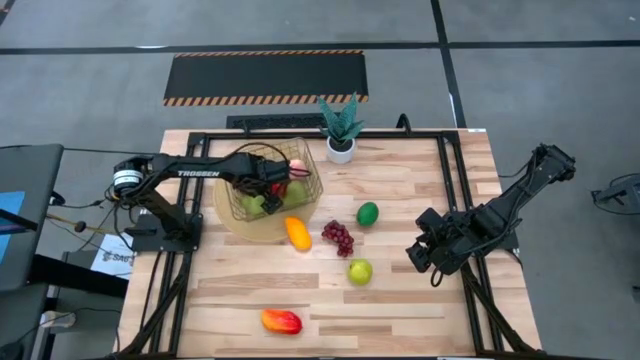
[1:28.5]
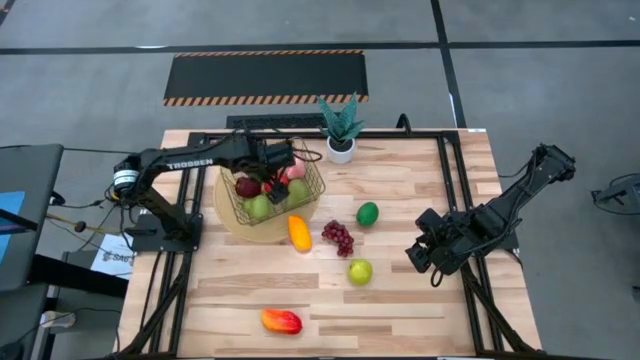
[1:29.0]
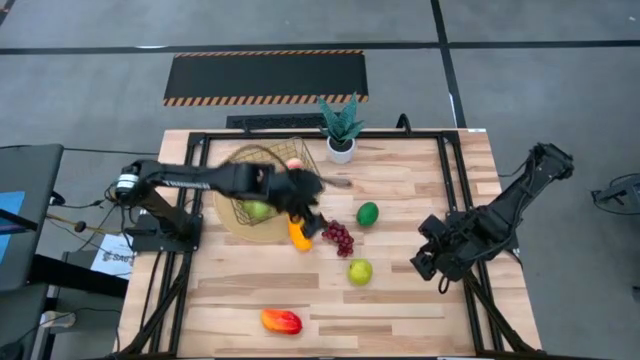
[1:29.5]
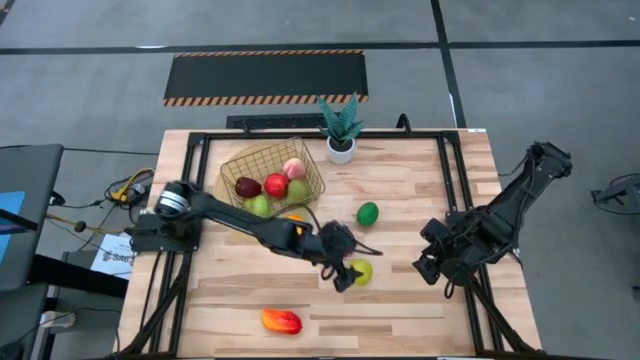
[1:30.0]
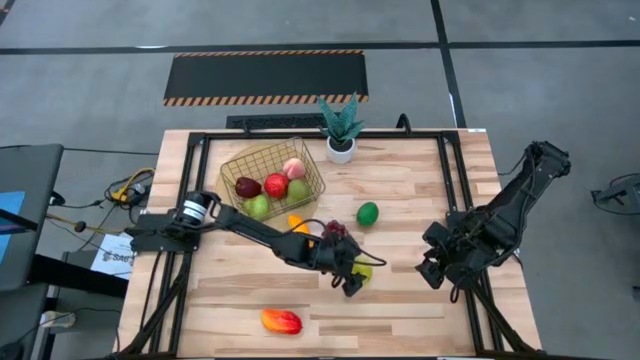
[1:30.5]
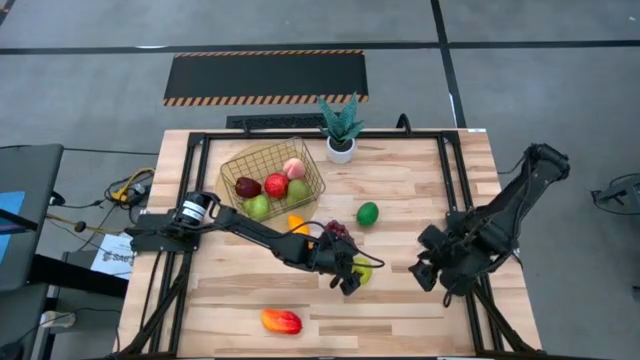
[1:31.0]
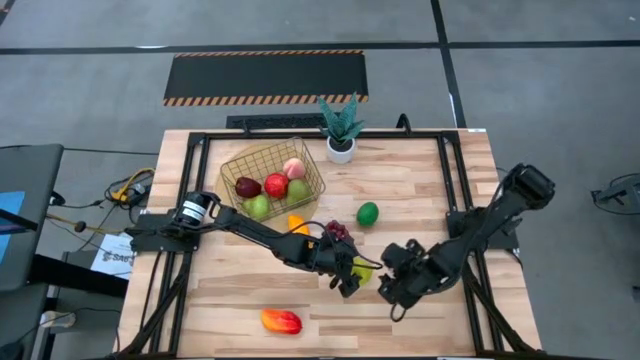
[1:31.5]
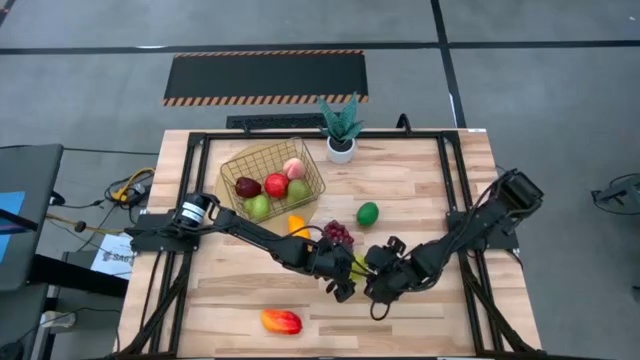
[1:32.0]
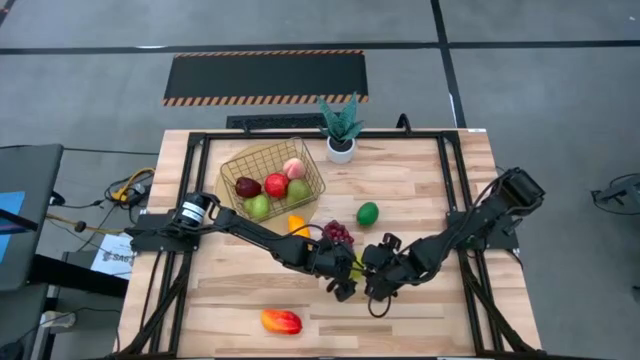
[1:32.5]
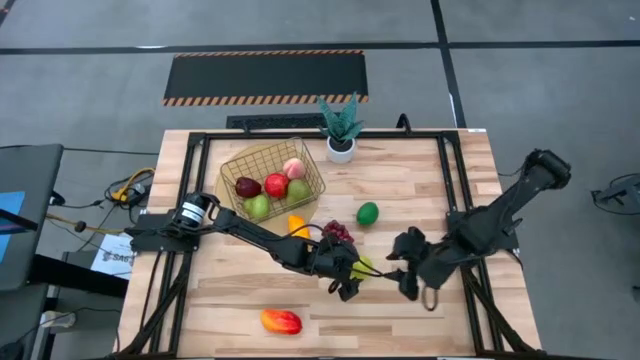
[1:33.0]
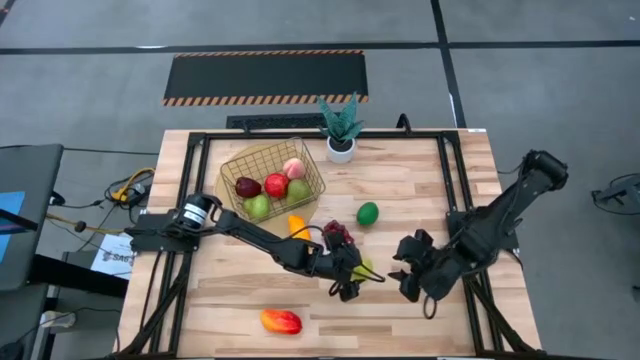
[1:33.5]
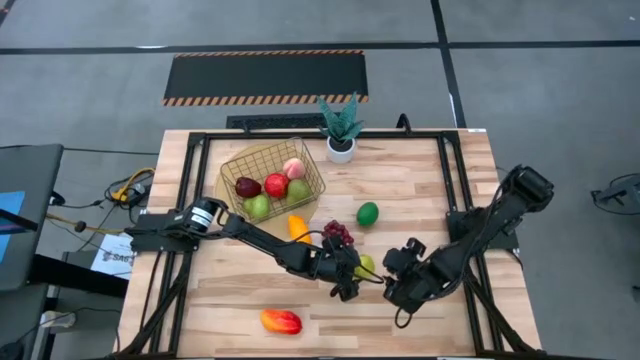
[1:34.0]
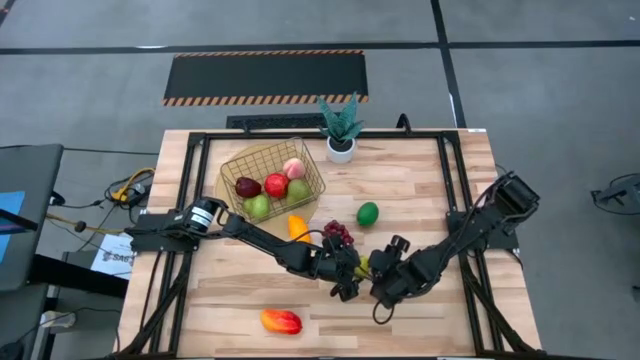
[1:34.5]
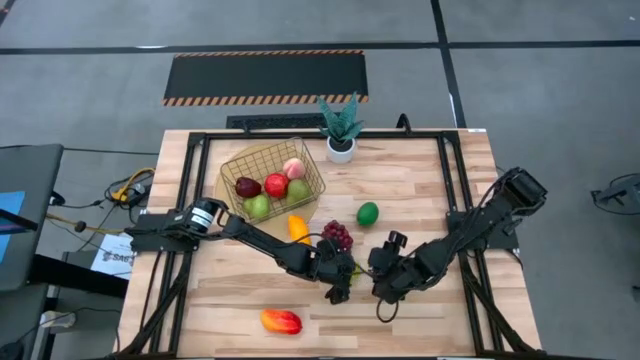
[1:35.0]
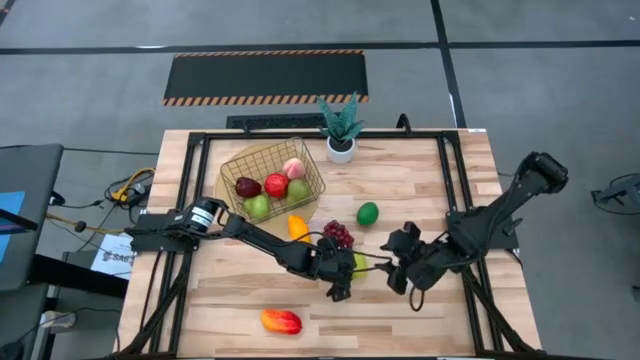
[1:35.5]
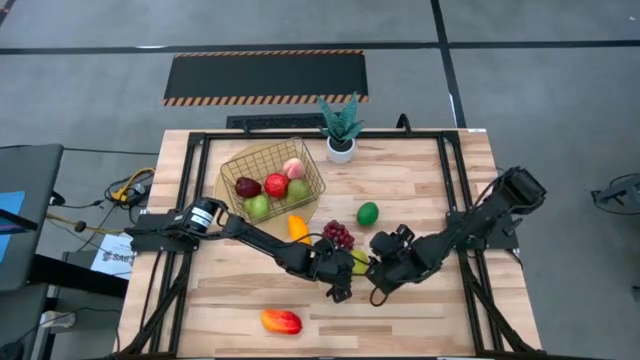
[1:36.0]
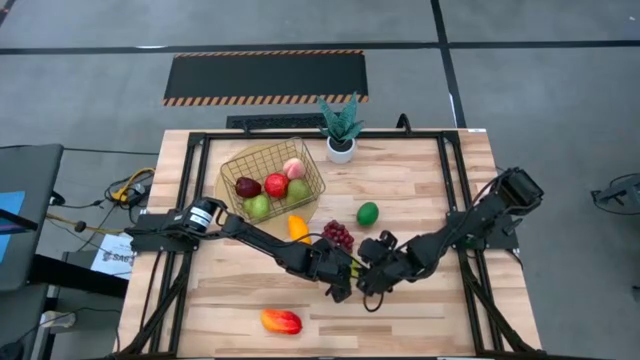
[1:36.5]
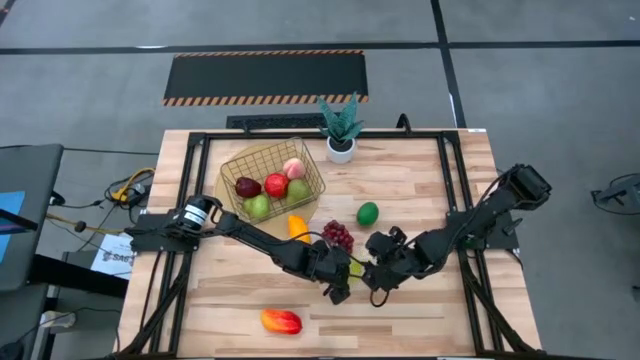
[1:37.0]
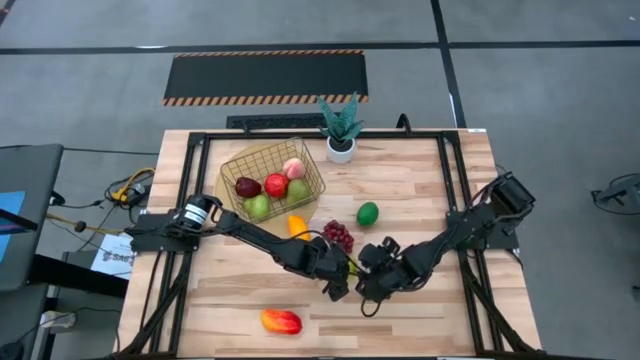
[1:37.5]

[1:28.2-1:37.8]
Task: Build produce basket
Put the green apple into the wire basket

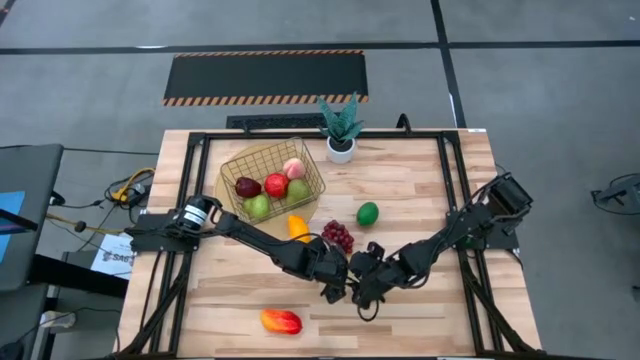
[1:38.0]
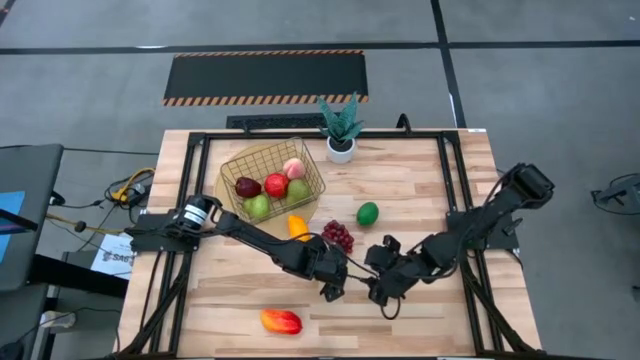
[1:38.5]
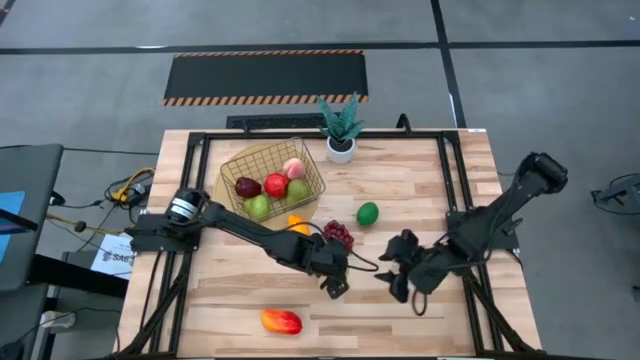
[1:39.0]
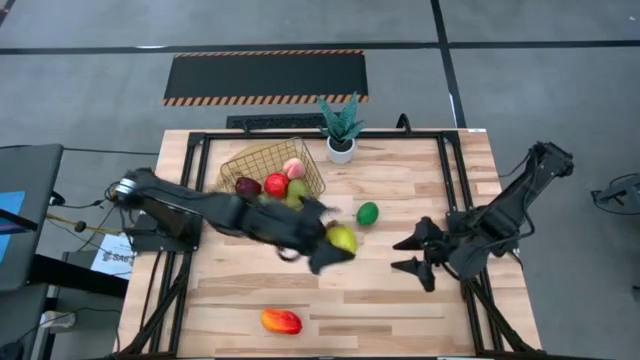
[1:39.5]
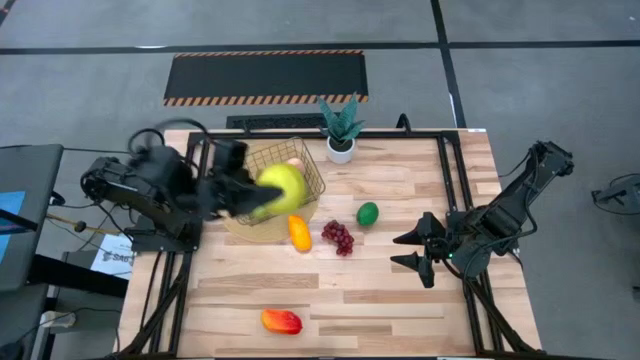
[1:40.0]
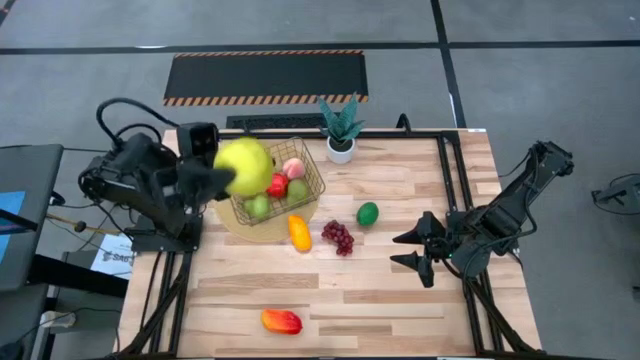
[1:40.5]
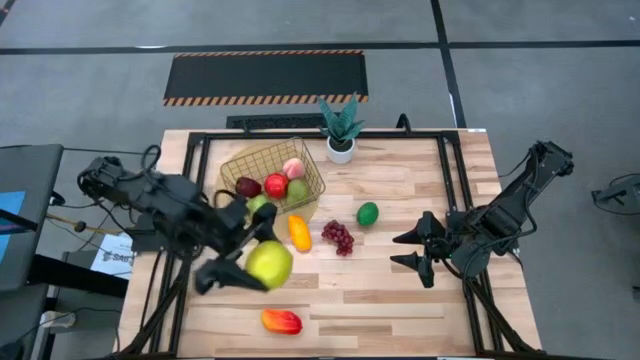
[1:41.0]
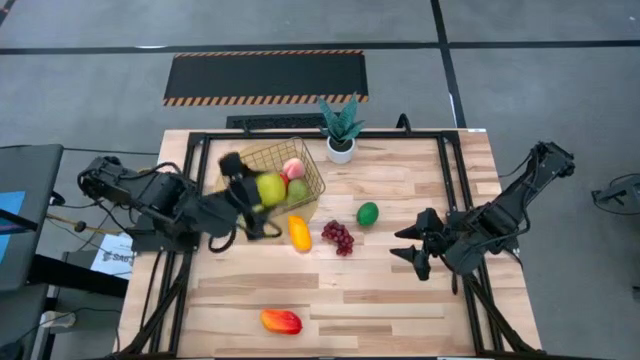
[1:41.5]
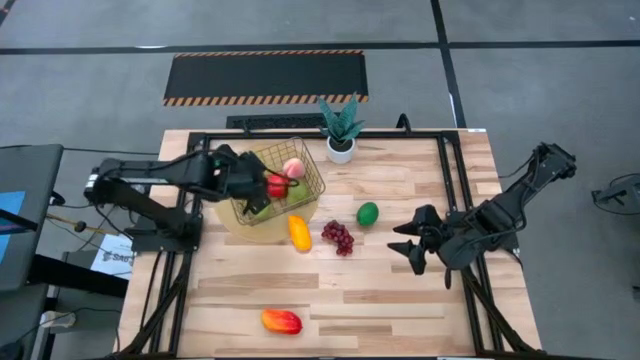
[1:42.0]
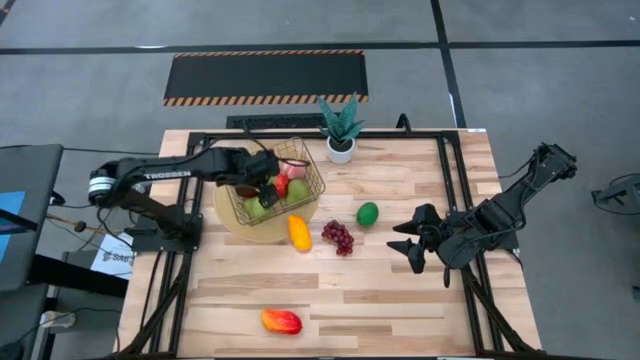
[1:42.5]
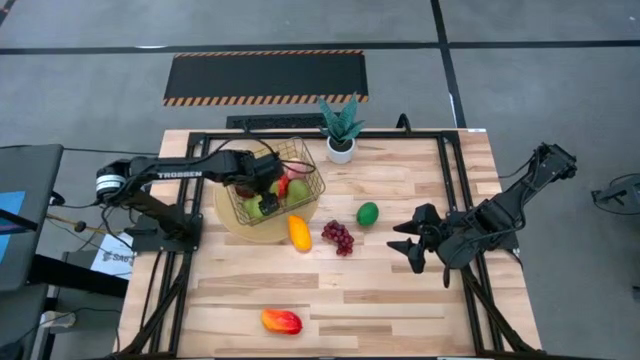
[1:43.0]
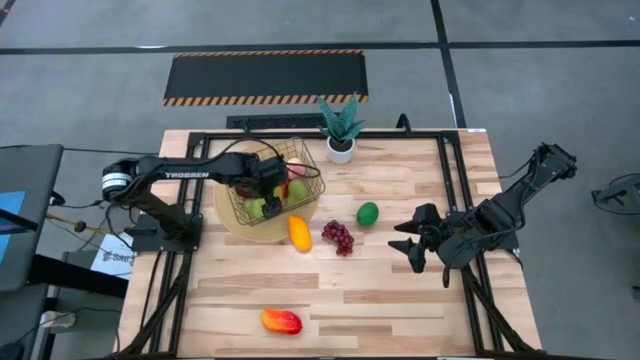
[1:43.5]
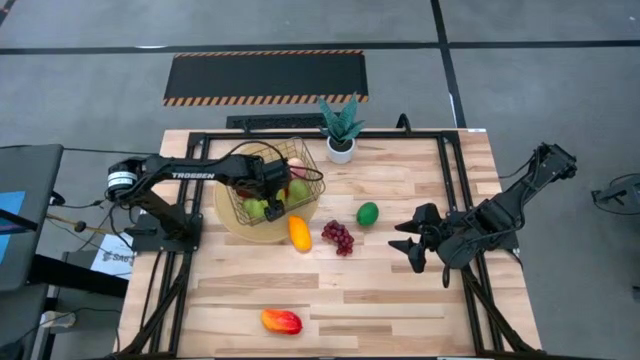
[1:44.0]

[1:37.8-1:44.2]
Put the green apple into the wire basket
